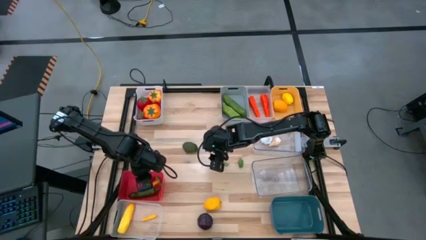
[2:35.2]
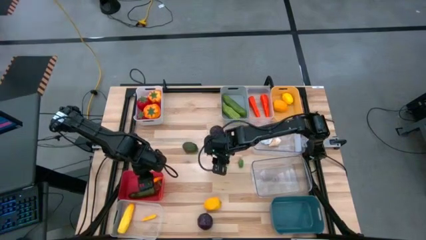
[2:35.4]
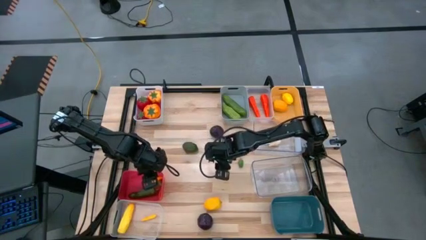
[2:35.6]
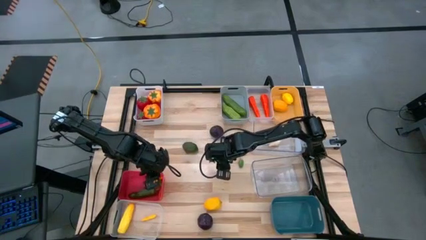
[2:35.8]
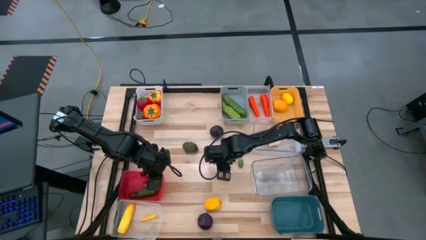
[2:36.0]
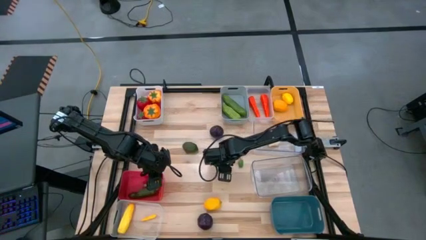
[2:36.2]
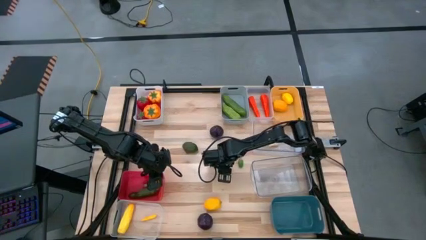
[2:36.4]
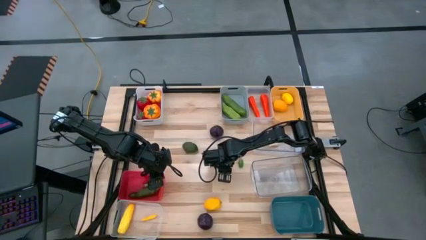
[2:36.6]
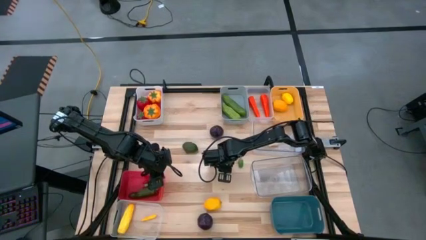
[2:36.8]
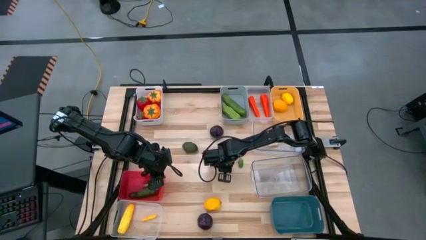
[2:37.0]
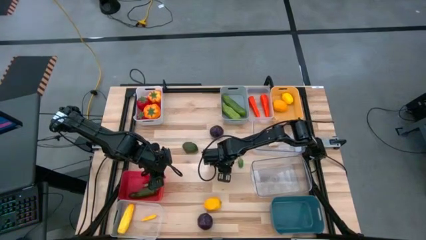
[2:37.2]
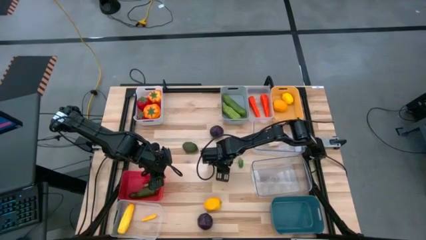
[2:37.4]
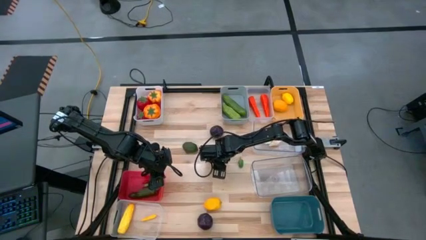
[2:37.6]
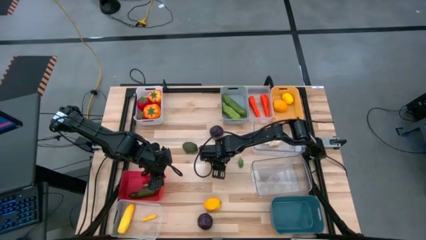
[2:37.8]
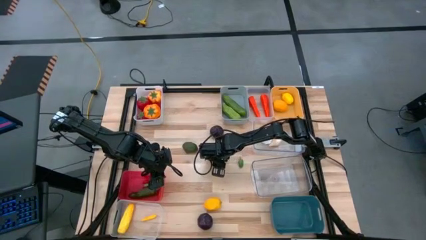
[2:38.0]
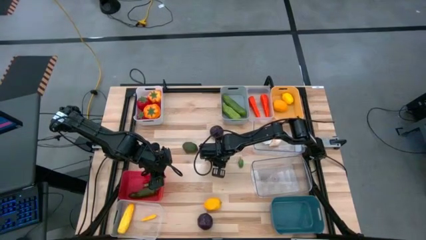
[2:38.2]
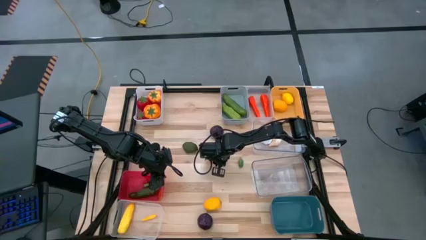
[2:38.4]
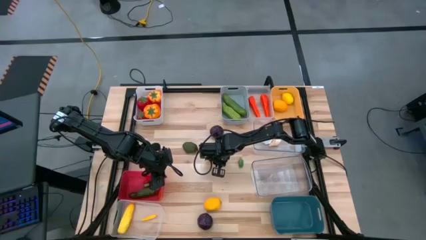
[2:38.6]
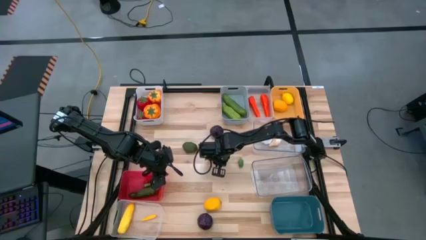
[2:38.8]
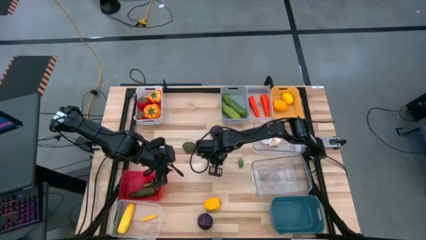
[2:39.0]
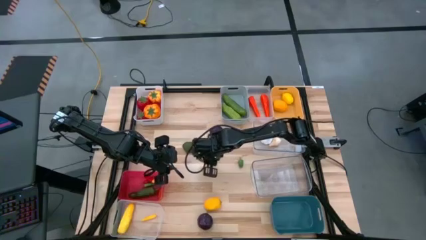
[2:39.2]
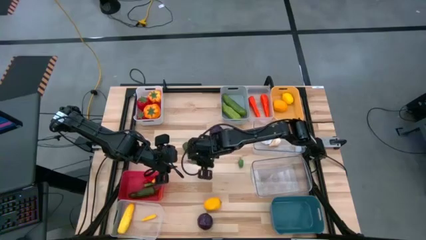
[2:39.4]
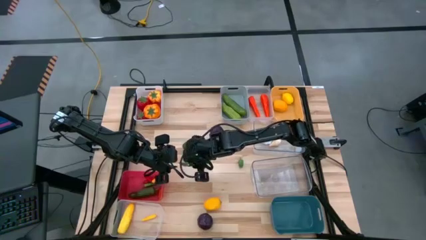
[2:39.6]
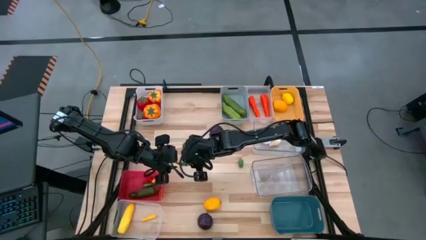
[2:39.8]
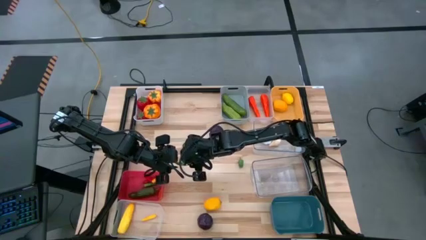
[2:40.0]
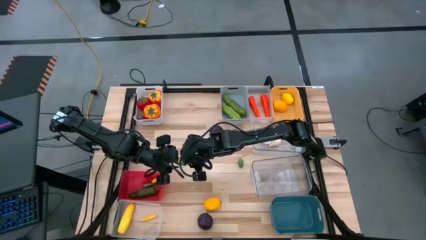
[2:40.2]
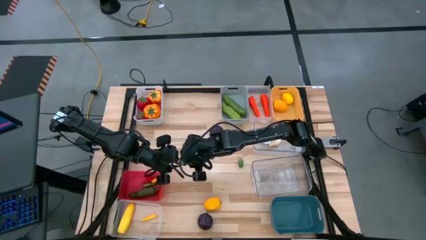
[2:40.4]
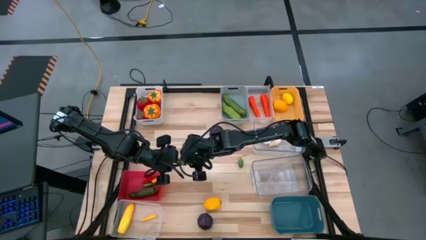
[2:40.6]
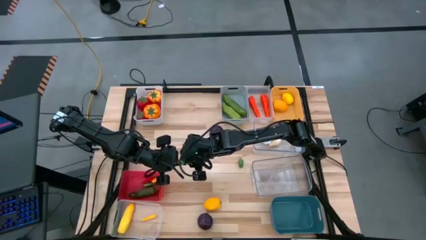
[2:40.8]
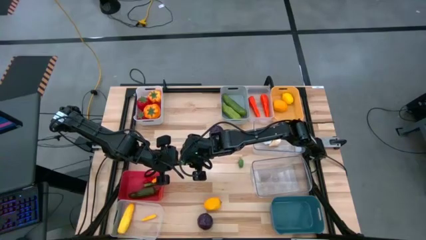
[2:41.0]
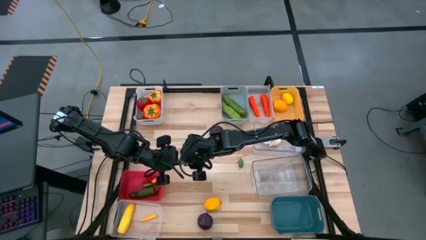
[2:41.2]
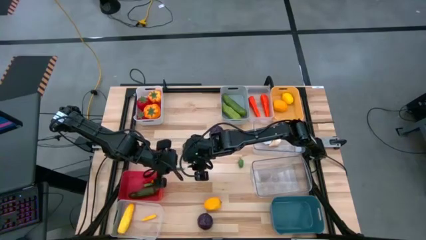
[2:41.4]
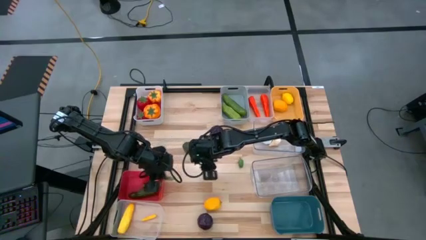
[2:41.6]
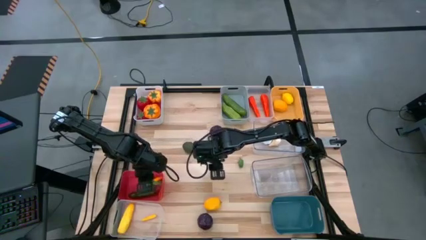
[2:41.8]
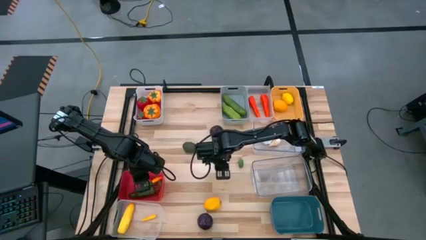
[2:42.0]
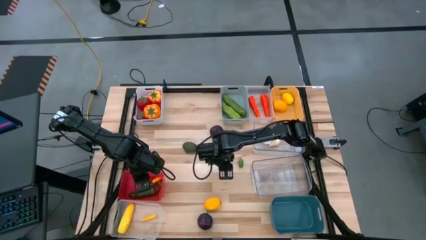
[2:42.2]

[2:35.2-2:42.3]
Task: Sort produce into baskets
Put the left green chili pepper into the red bin

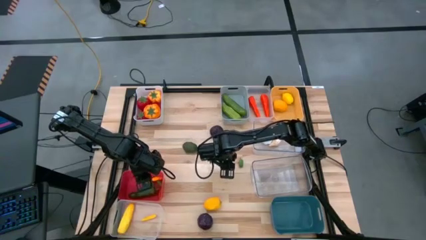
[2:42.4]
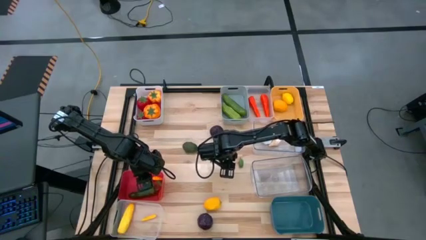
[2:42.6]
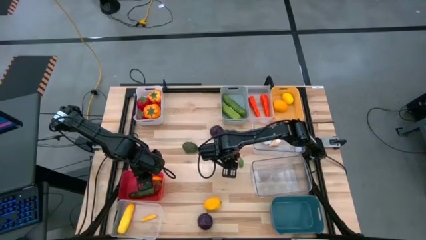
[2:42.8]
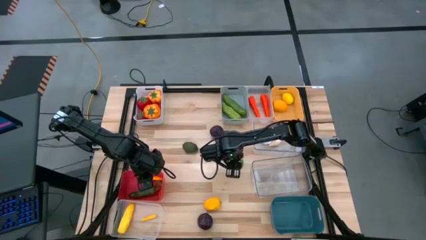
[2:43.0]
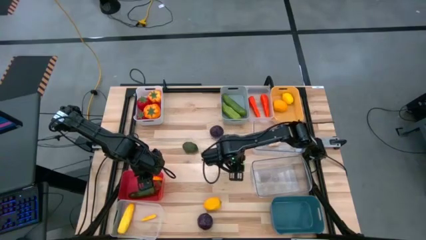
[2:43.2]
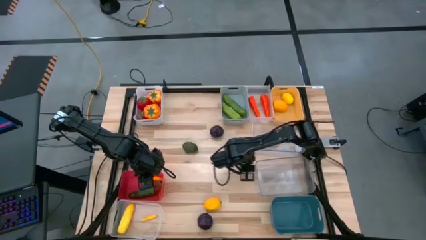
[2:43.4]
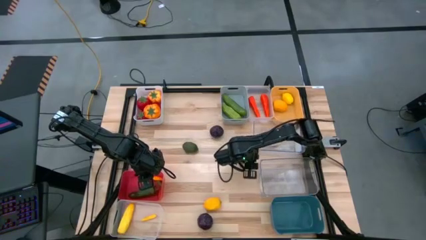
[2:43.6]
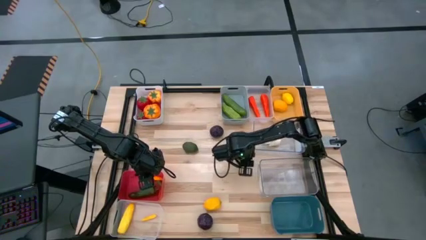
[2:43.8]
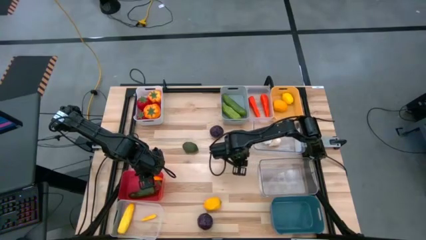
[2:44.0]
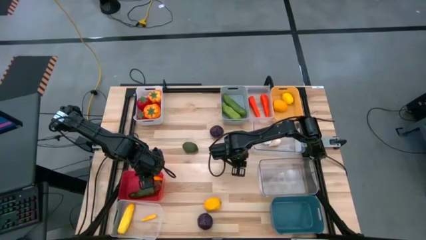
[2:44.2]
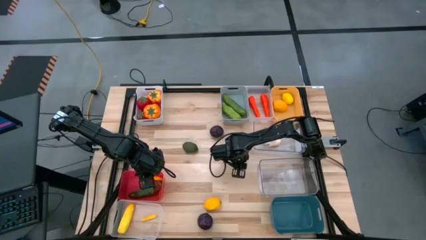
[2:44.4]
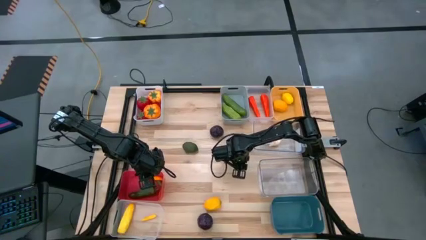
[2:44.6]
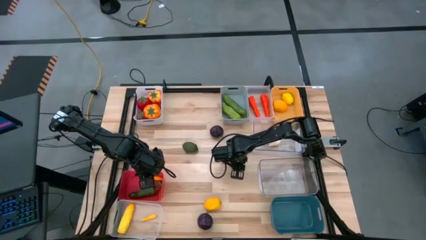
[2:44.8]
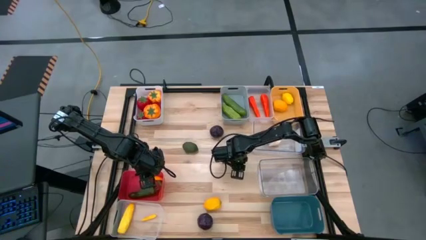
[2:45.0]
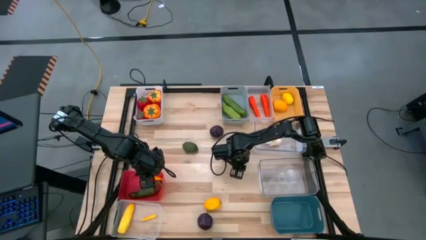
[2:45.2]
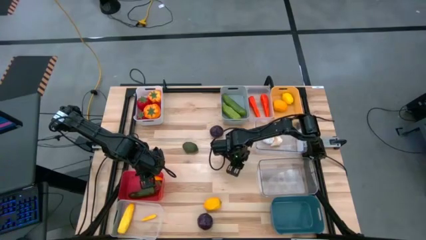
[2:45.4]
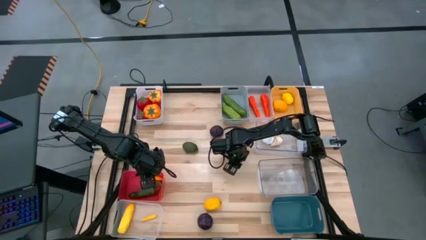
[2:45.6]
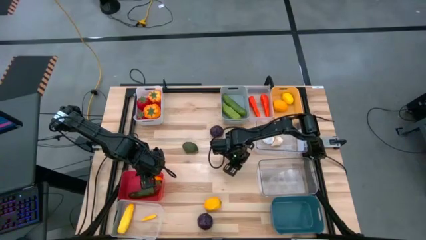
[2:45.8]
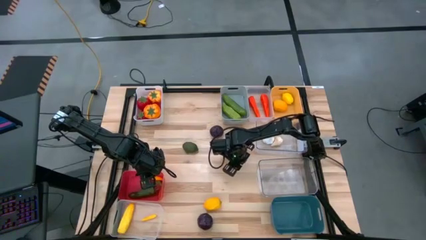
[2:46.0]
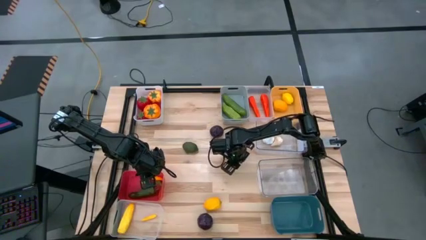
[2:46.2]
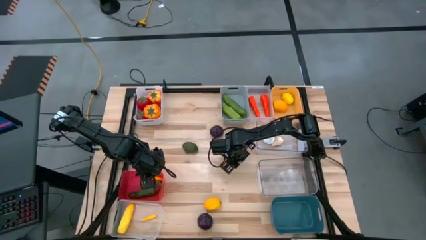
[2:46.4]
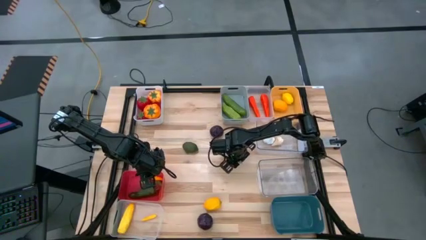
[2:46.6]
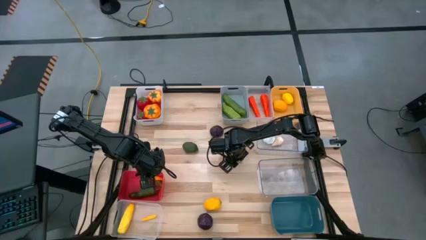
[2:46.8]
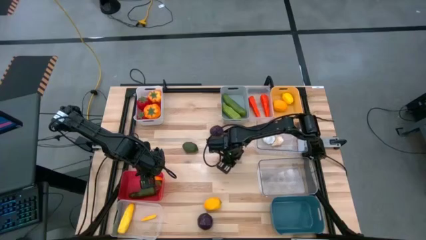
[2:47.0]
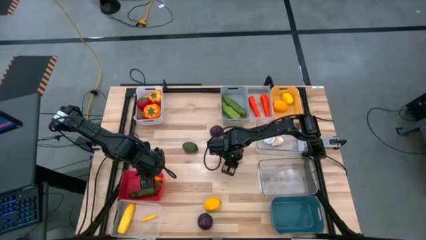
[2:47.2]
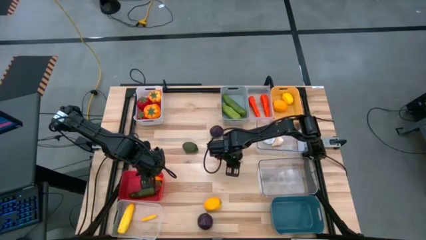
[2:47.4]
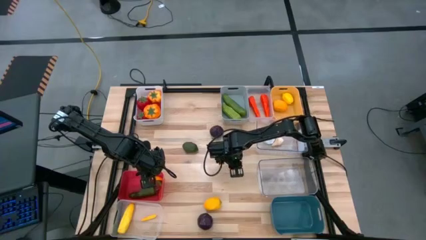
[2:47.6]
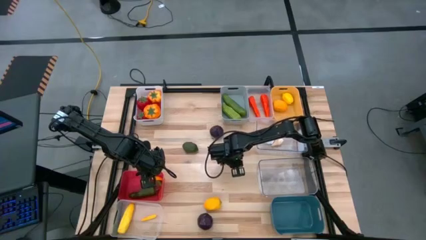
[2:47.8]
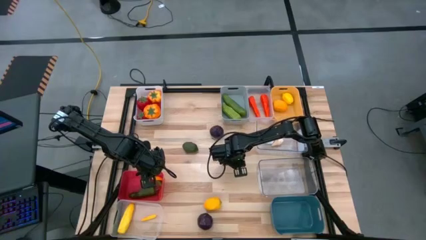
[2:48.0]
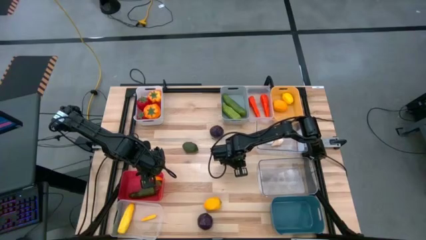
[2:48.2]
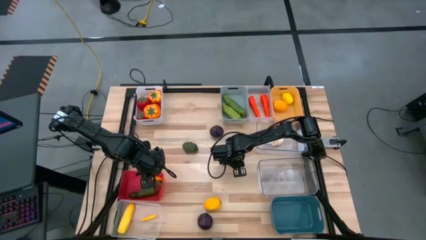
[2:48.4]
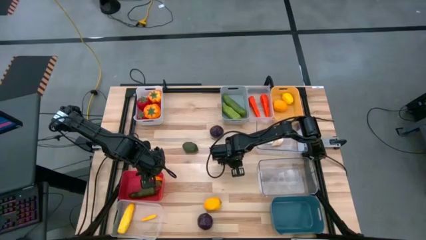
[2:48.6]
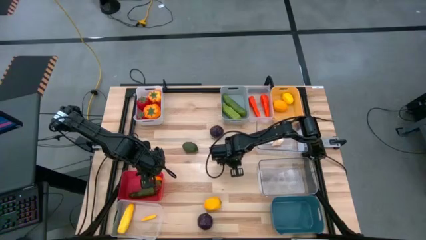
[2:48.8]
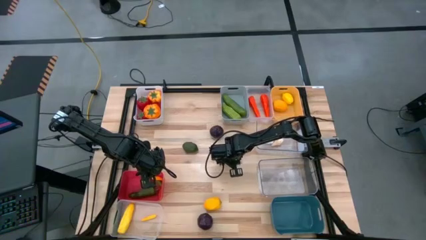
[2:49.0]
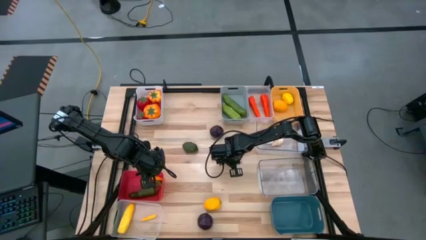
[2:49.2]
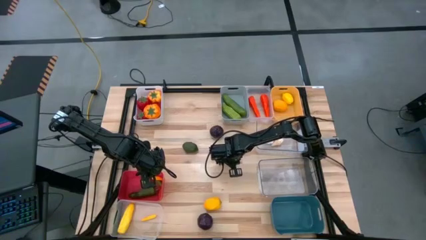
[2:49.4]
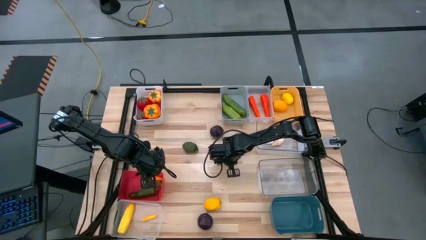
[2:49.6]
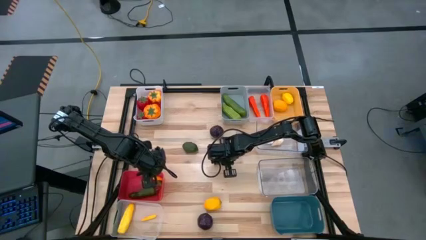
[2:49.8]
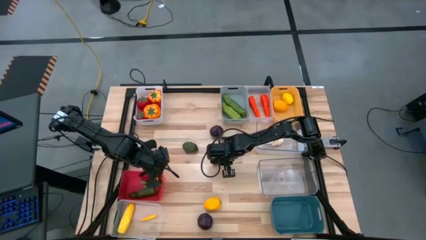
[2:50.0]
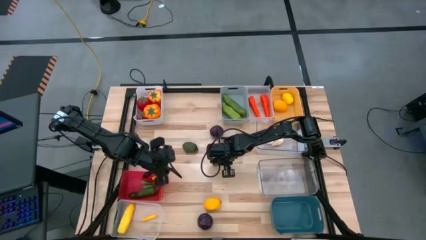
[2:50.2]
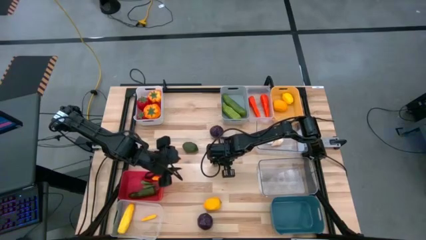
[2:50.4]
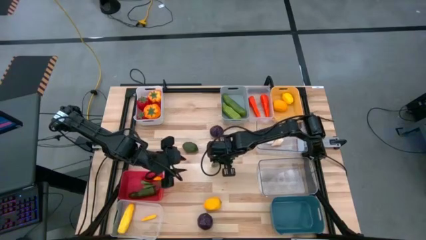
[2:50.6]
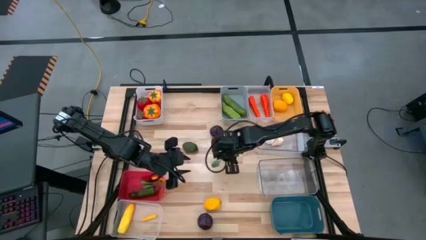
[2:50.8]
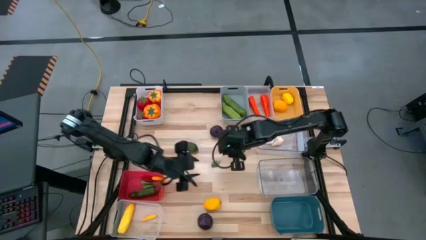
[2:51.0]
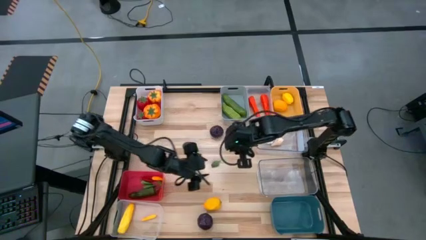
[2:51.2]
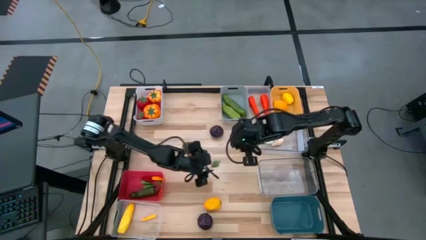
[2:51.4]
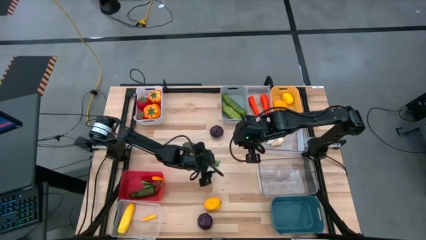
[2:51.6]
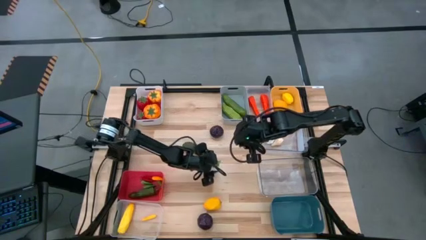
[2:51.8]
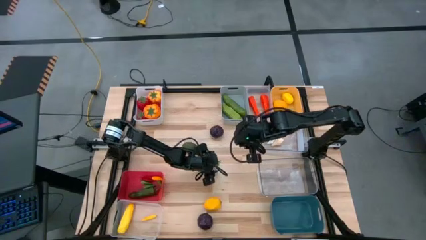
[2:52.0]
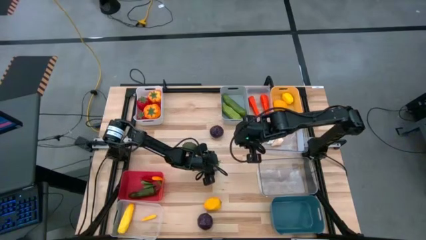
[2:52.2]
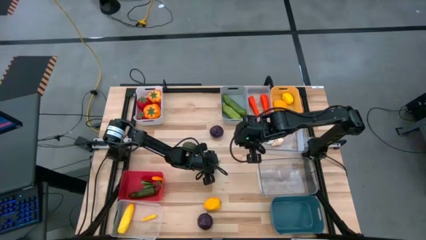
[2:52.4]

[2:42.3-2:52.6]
Put the green chili pepper into the red bin

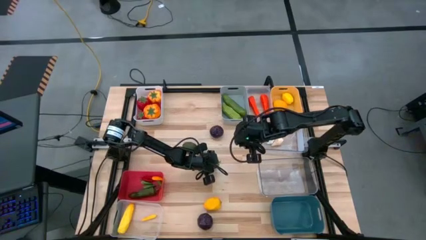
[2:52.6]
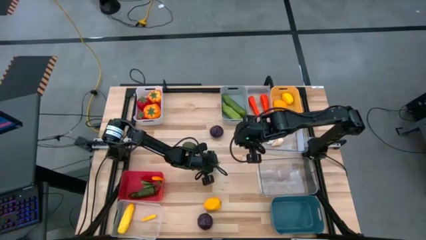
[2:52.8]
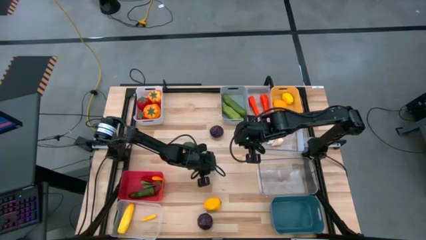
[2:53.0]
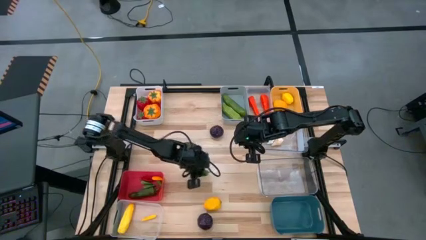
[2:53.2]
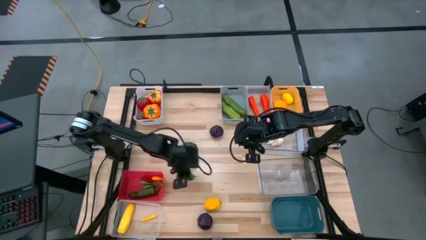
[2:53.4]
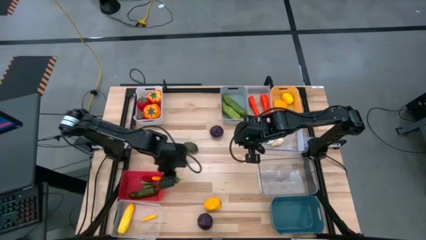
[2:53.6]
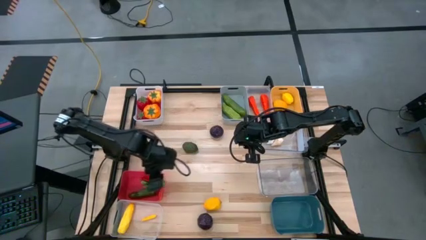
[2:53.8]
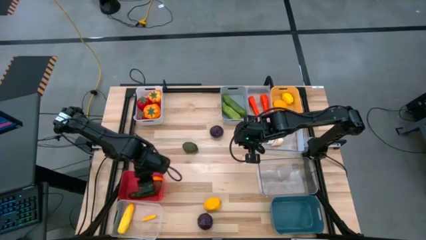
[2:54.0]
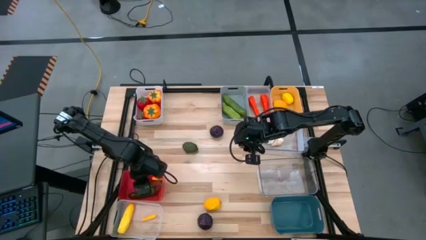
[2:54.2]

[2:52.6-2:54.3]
Put the green chili pepper into the red bin
